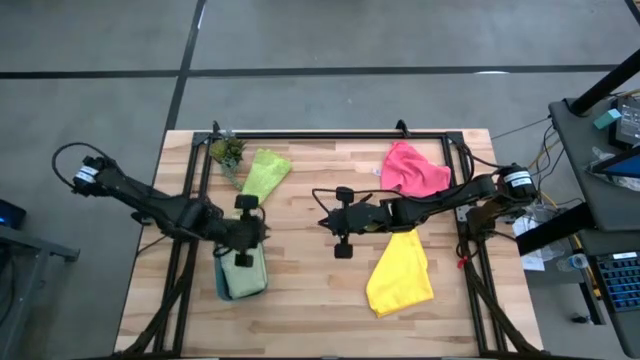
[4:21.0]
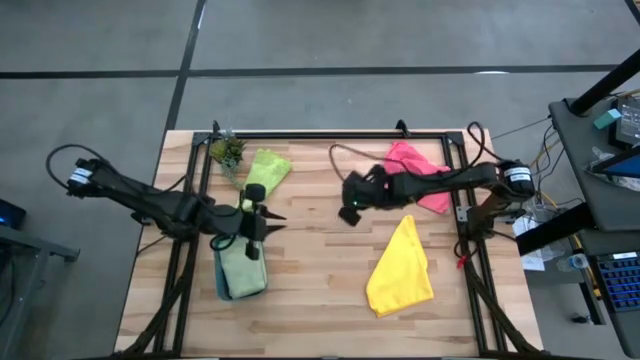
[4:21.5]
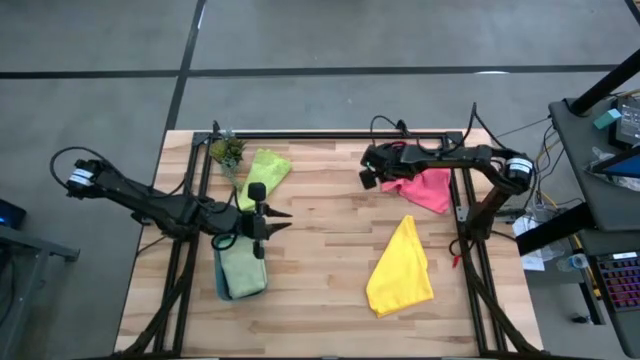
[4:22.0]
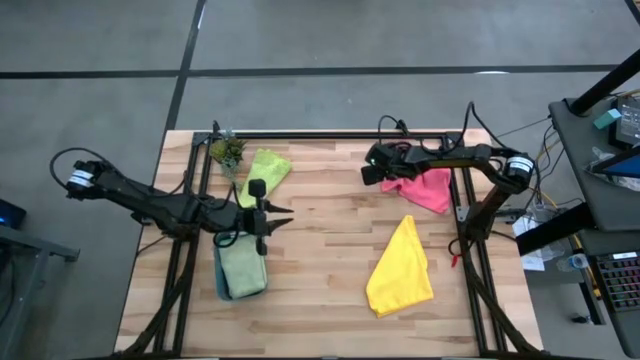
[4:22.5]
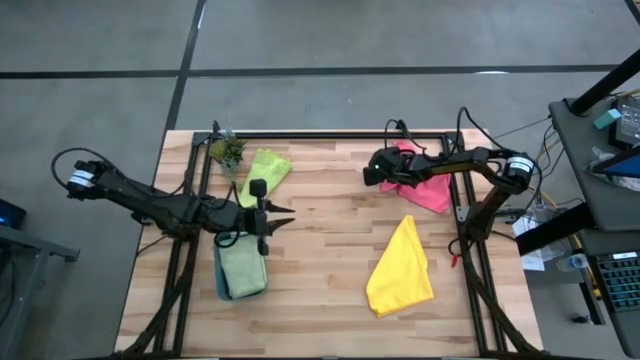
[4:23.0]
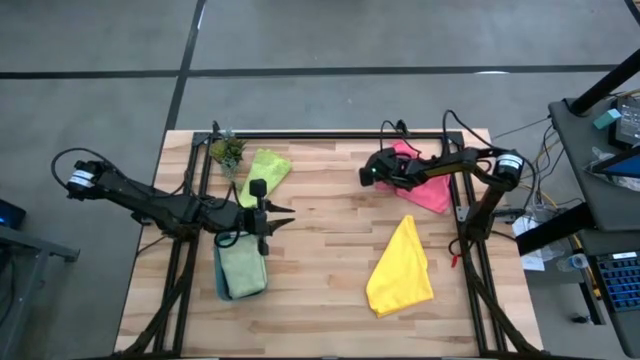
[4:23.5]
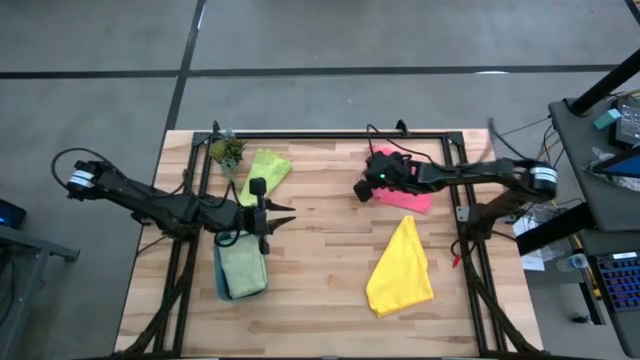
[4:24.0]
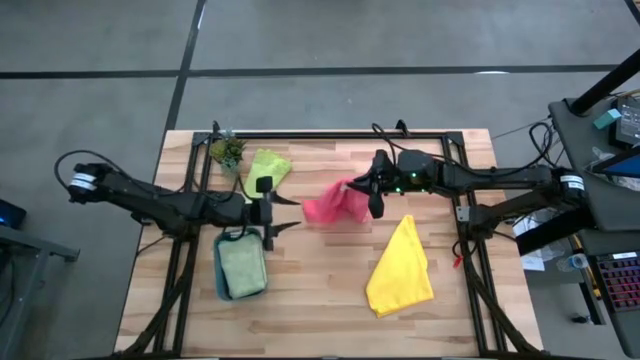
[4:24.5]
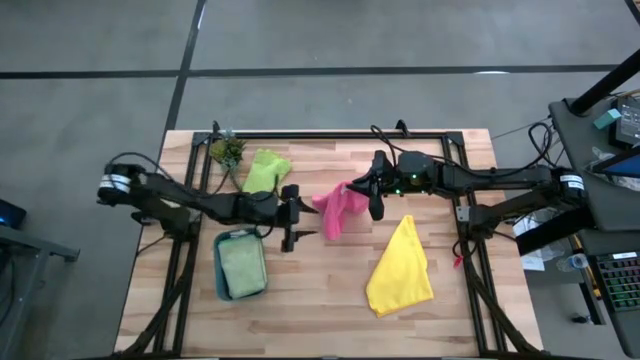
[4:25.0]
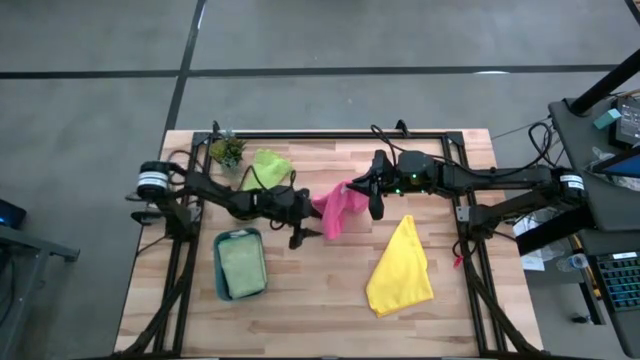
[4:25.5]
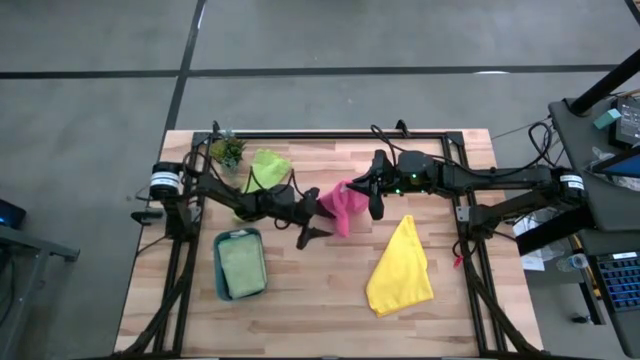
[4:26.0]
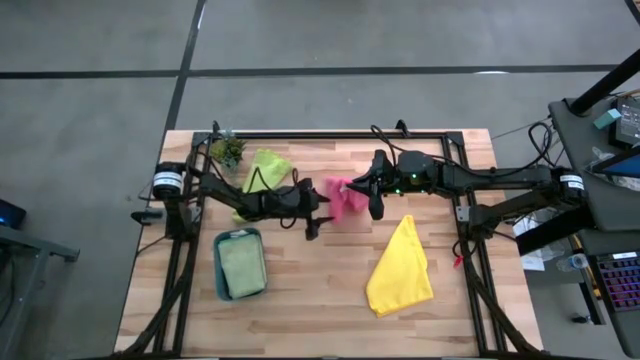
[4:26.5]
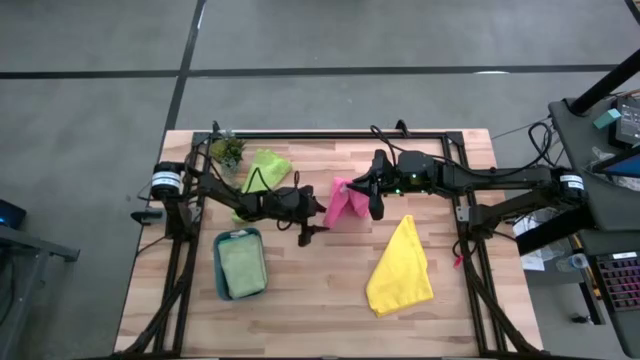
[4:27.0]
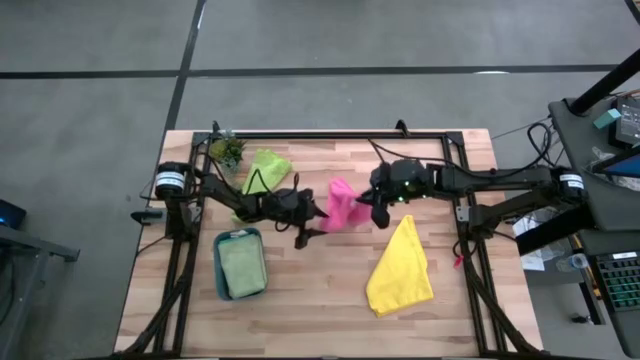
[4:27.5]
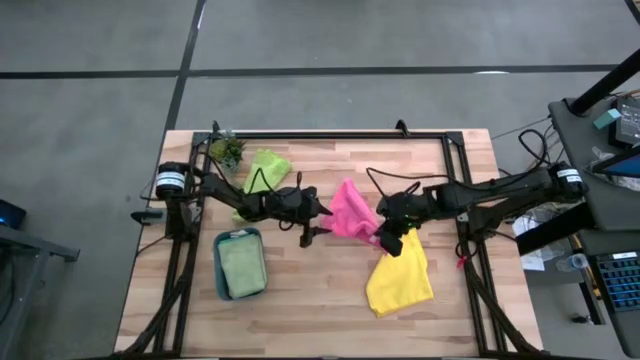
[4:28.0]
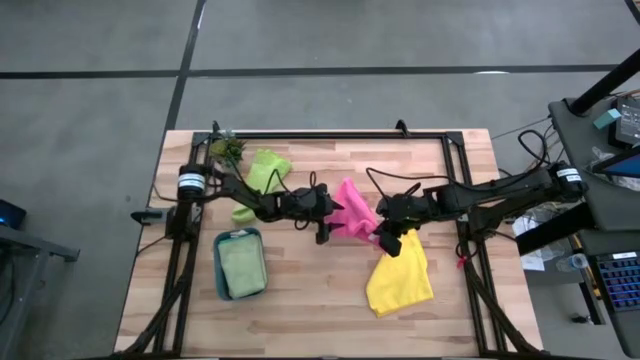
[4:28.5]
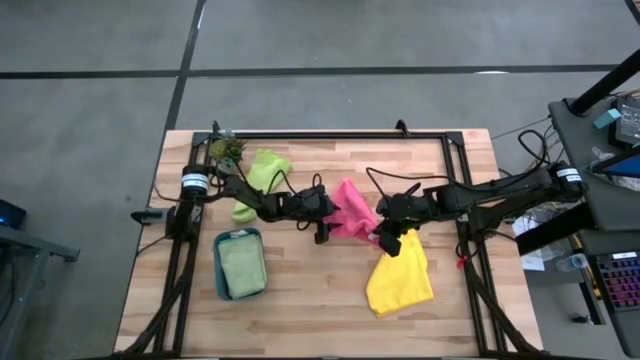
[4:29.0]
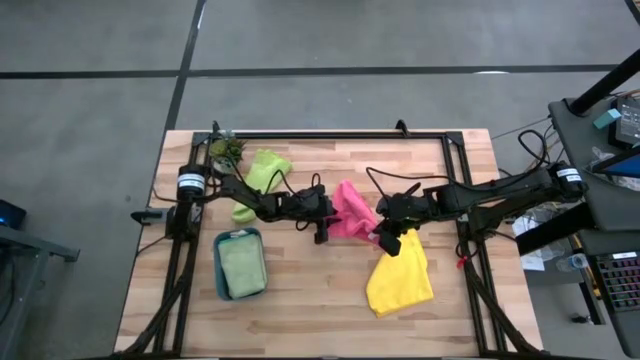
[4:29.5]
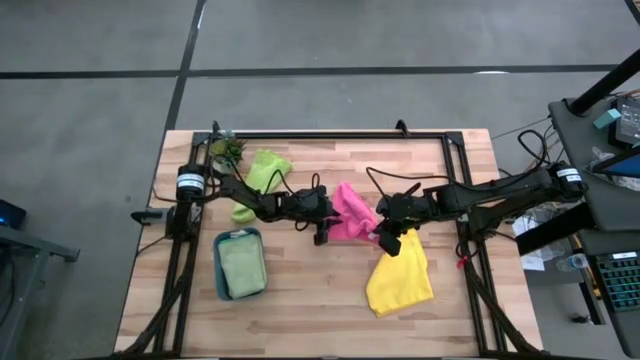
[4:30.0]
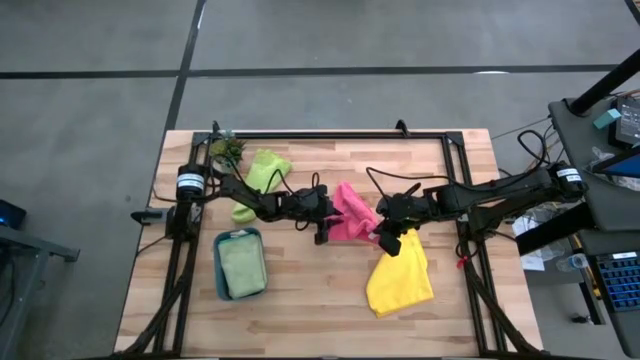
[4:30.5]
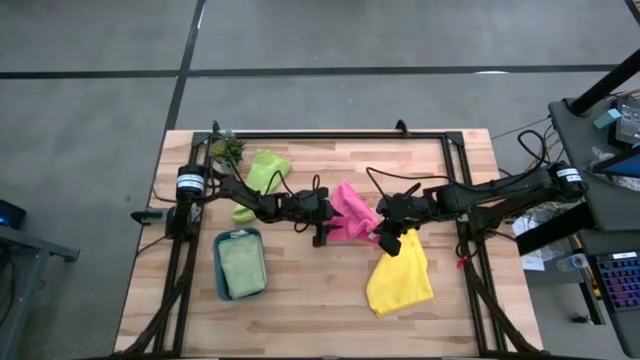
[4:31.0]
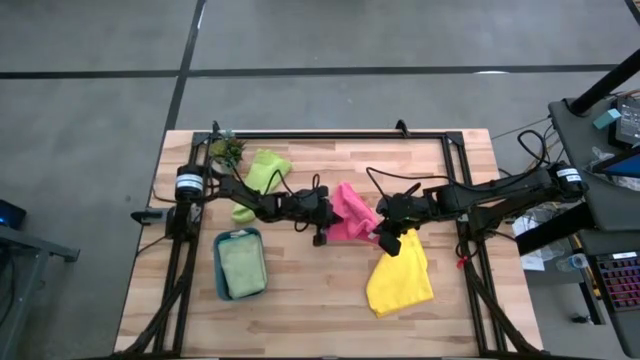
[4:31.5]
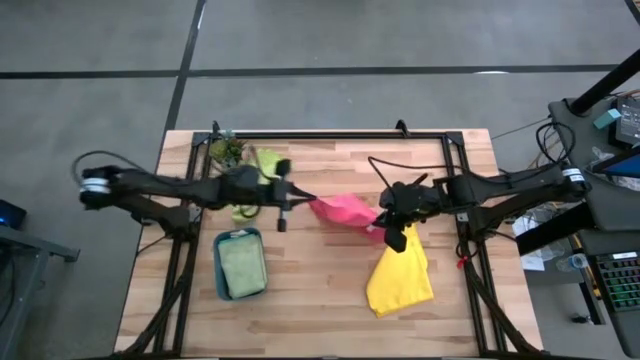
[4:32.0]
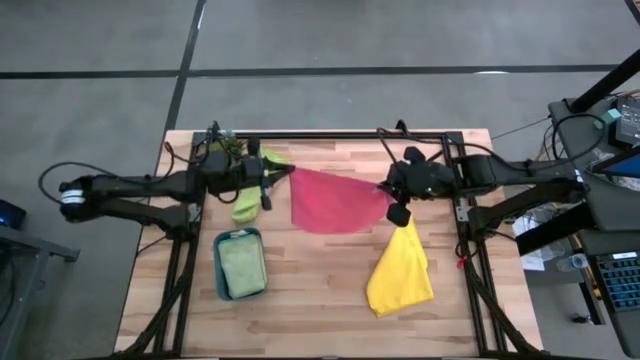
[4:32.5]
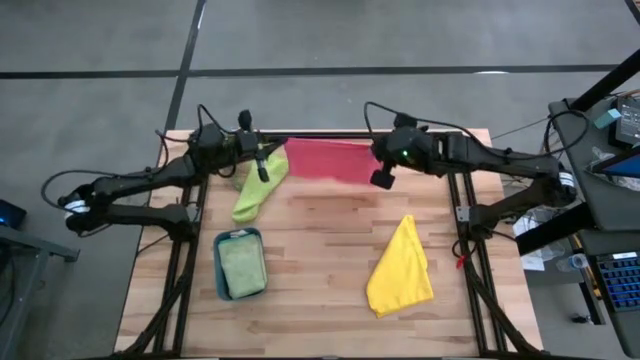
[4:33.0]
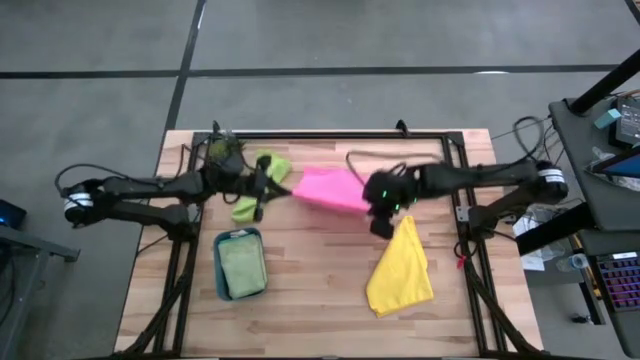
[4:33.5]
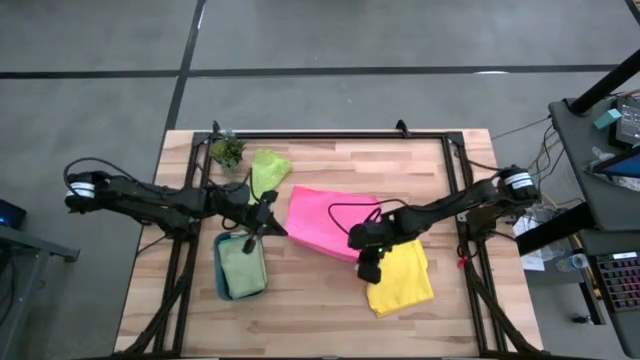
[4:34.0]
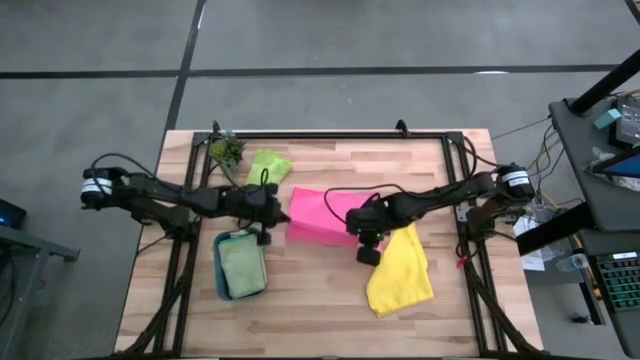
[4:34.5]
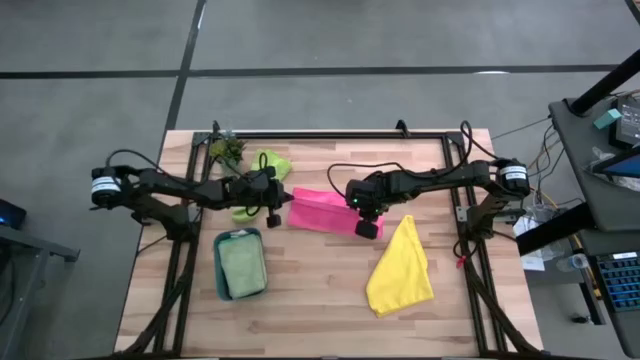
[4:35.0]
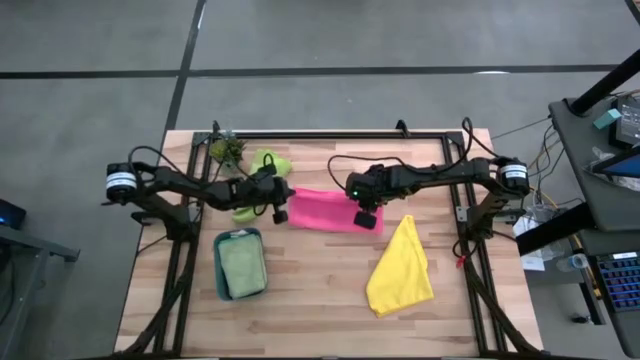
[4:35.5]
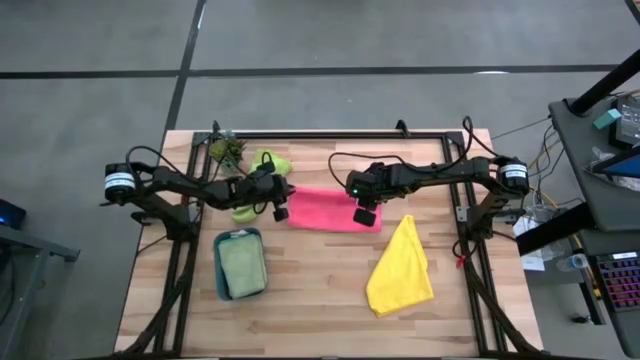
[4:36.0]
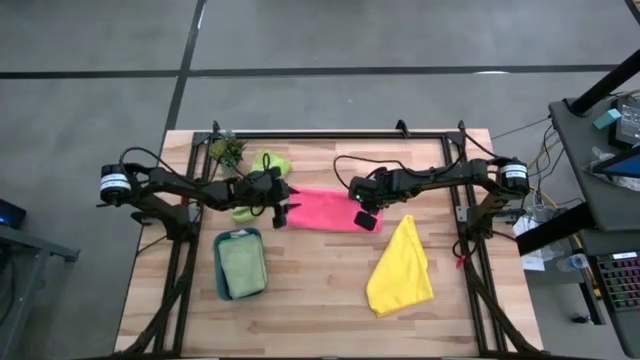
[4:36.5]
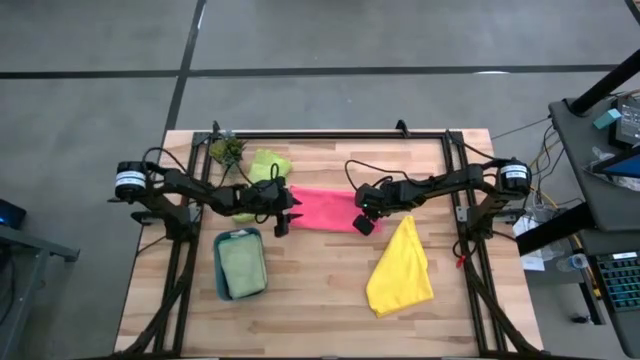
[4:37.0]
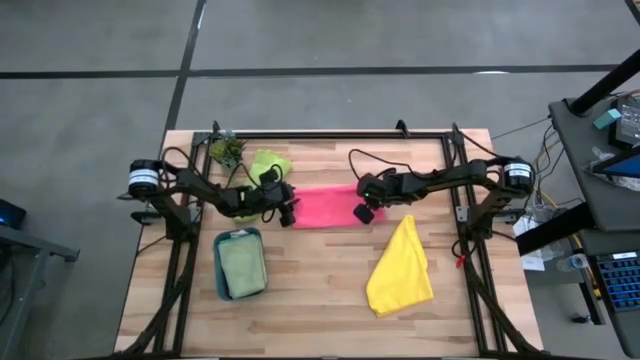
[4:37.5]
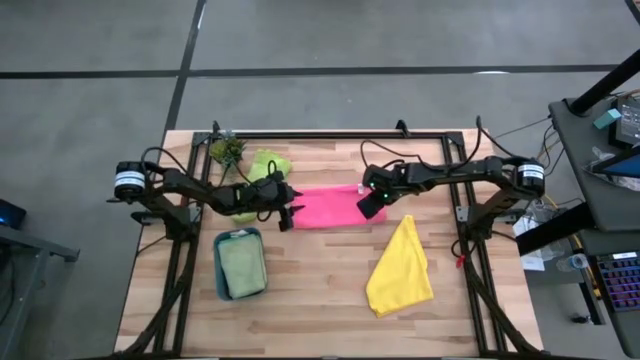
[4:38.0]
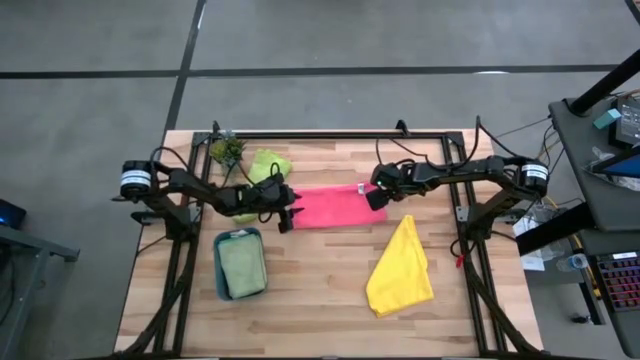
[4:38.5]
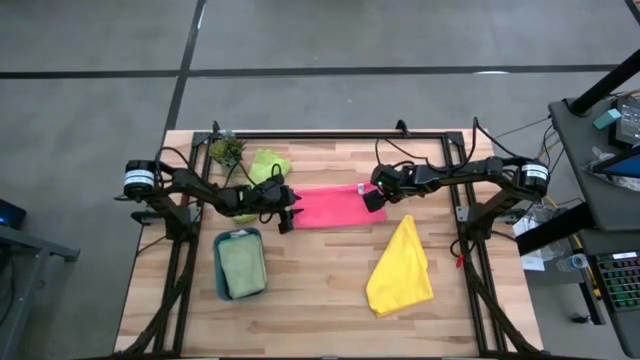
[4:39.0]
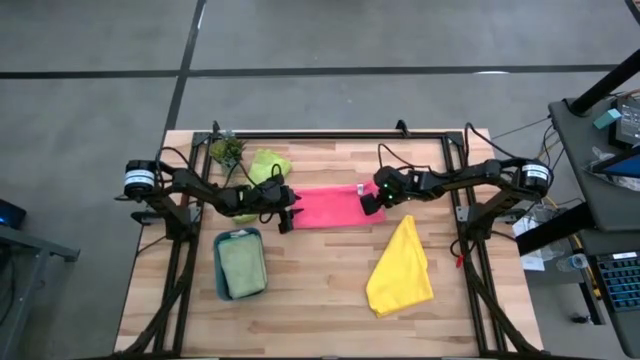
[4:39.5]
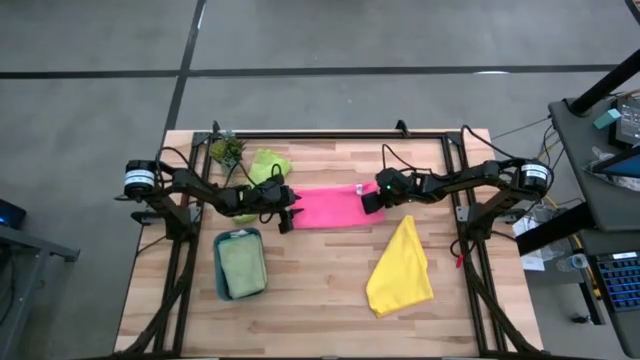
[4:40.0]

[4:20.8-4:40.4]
Task: Fold microfiber towels
Fold the pink microfiber cloth

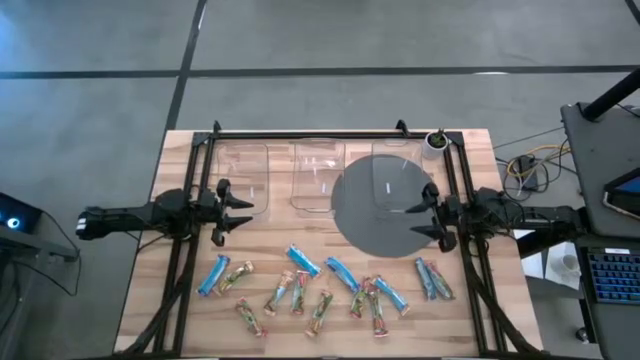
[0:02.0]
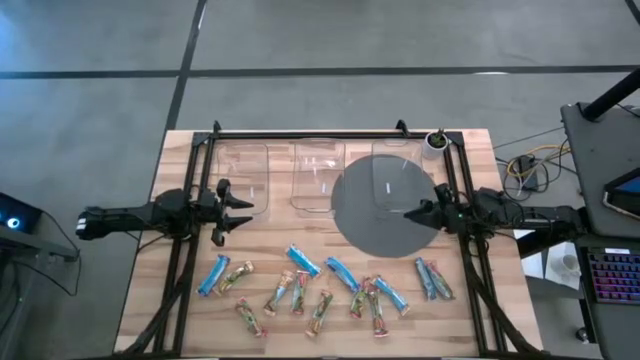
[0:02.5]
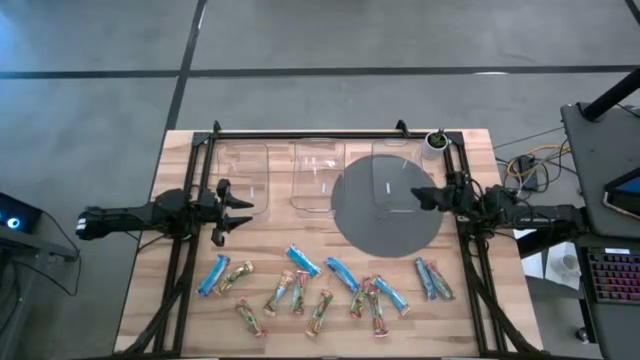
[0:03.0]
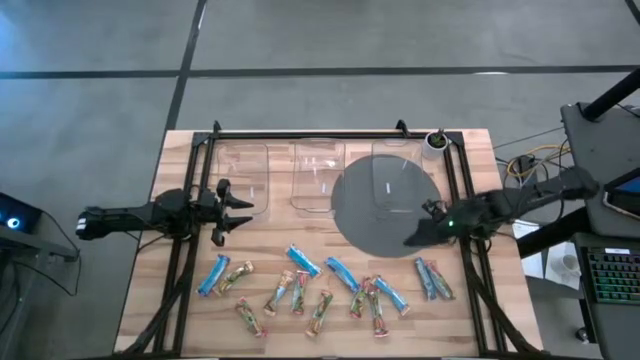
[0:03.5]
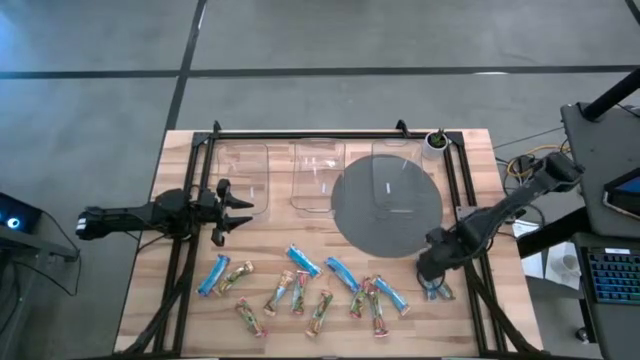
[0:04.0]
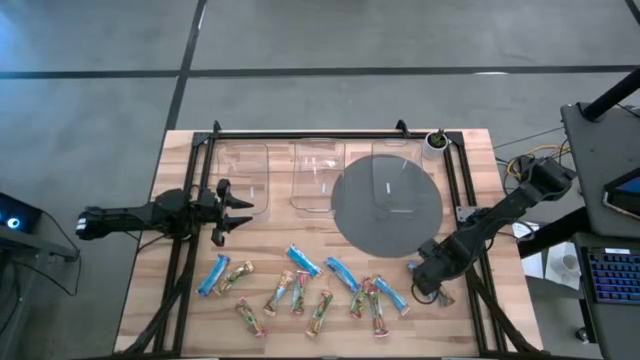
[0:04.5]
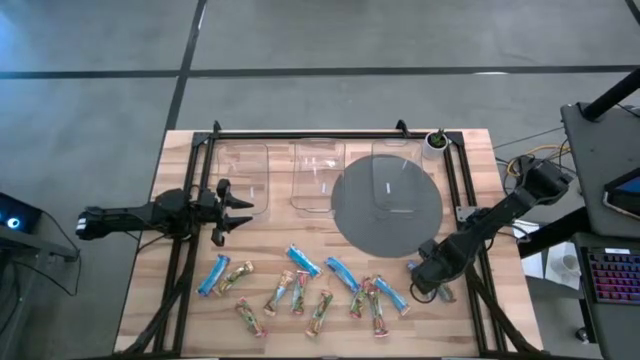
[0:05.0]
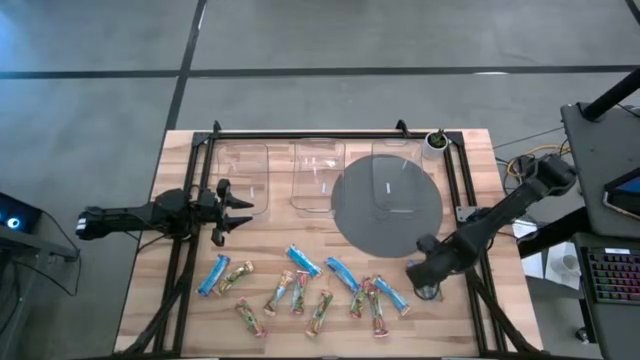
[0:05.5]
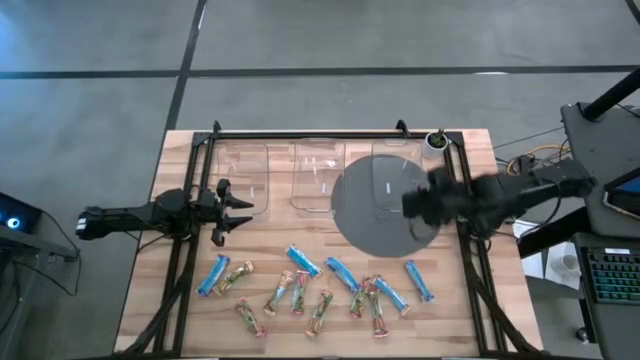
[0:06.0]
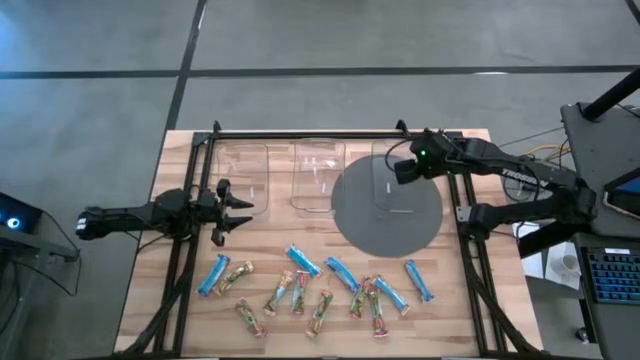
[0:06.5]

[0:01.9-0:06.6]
Task: Pick and place Granola Bars by type
Put the red granola bar into the right transparent container
